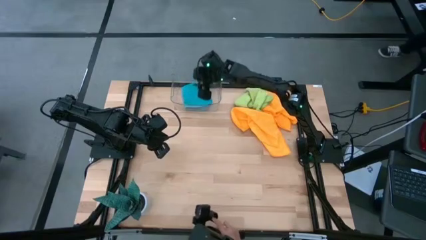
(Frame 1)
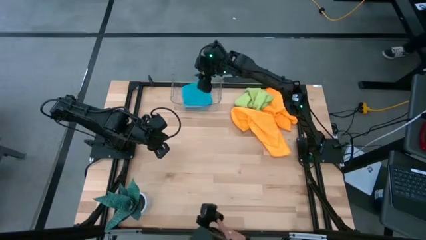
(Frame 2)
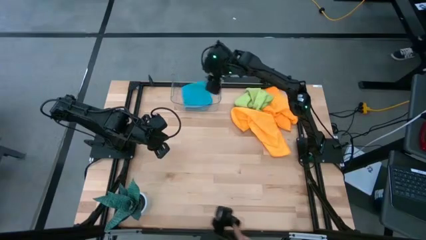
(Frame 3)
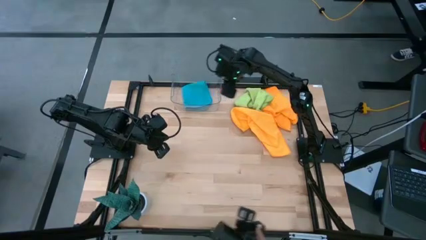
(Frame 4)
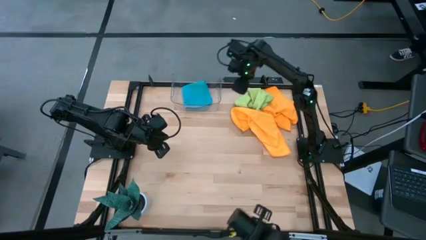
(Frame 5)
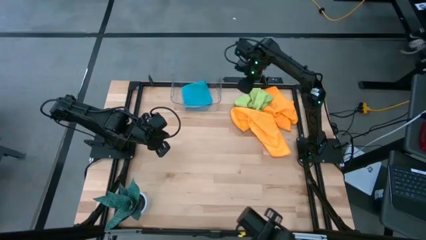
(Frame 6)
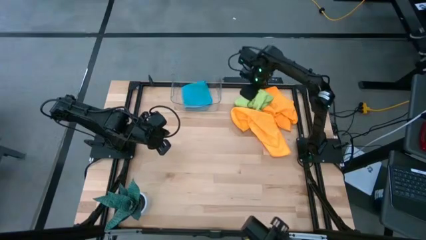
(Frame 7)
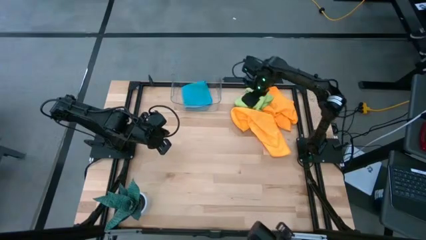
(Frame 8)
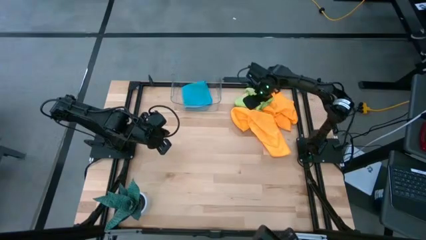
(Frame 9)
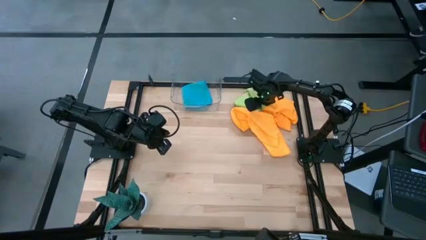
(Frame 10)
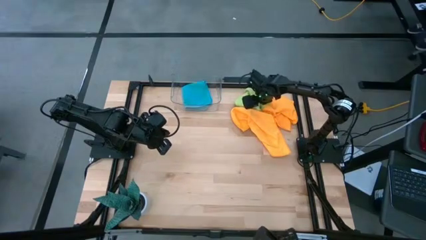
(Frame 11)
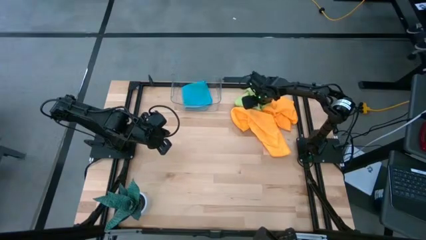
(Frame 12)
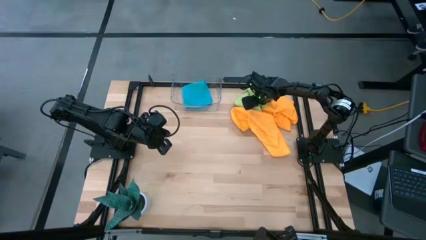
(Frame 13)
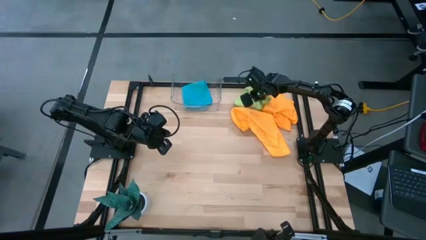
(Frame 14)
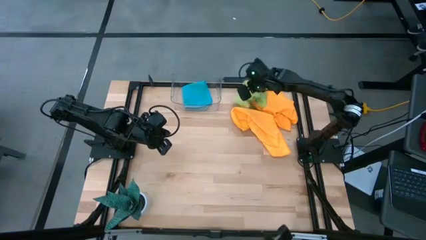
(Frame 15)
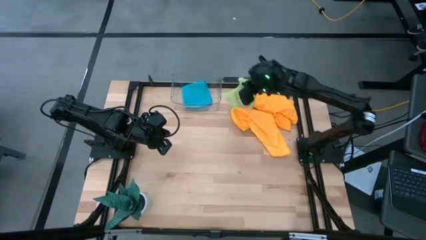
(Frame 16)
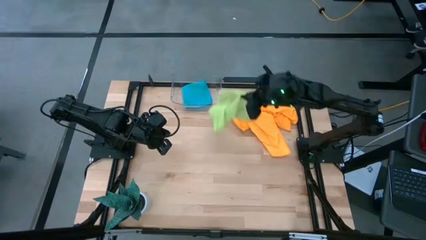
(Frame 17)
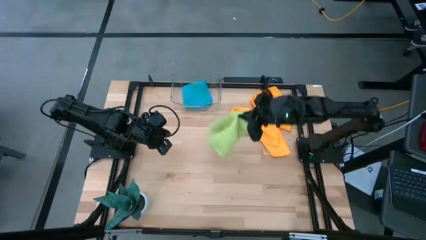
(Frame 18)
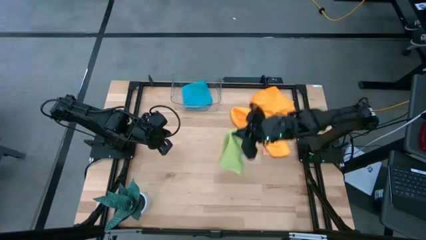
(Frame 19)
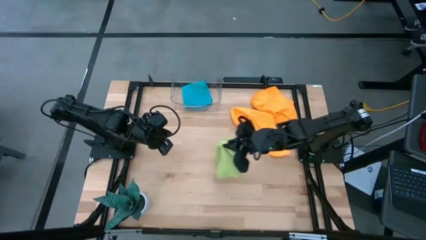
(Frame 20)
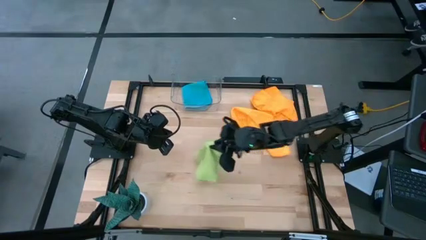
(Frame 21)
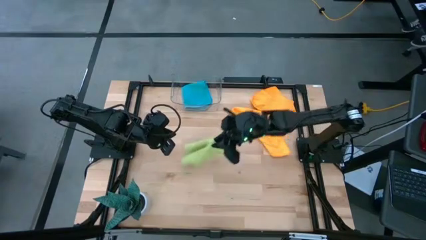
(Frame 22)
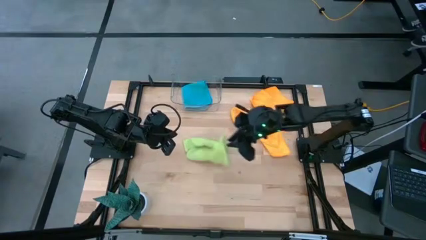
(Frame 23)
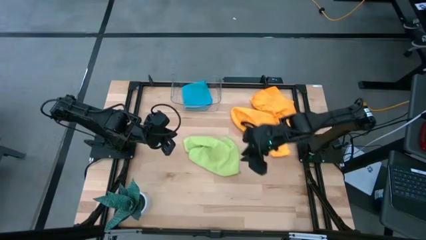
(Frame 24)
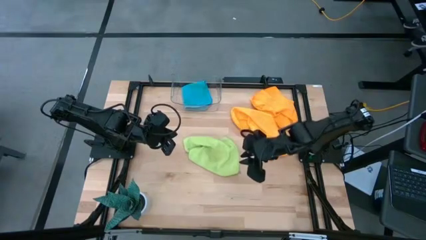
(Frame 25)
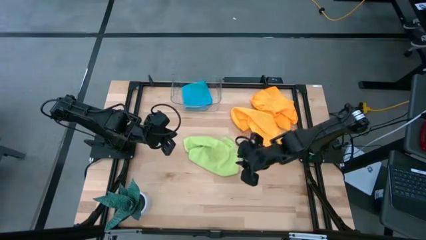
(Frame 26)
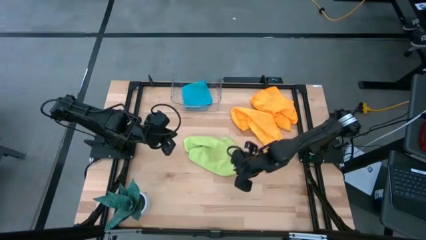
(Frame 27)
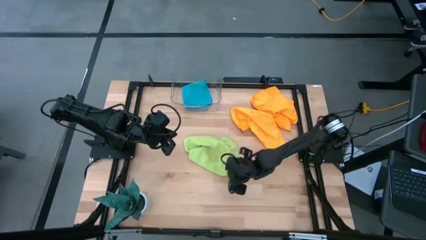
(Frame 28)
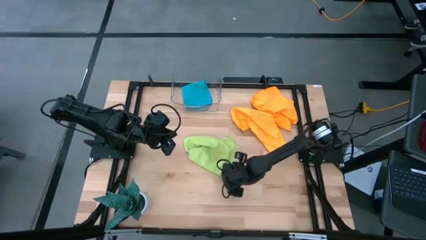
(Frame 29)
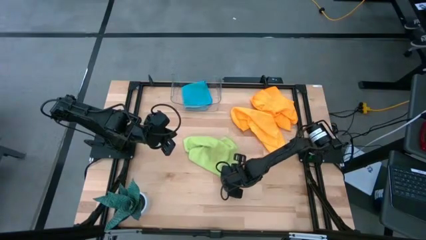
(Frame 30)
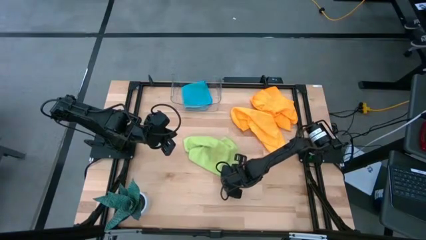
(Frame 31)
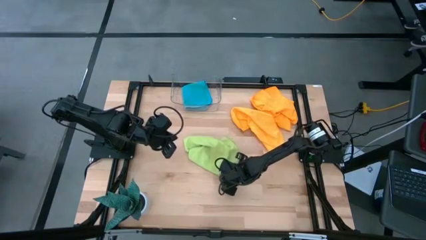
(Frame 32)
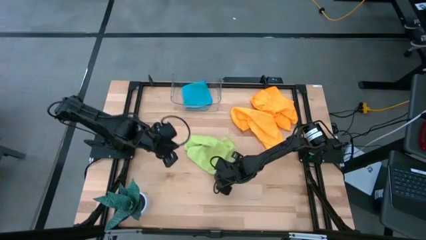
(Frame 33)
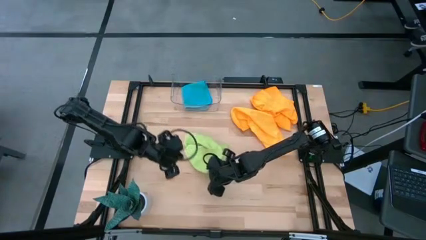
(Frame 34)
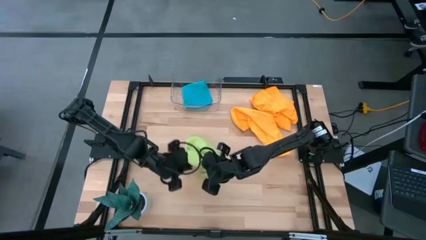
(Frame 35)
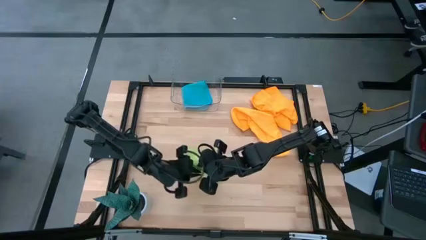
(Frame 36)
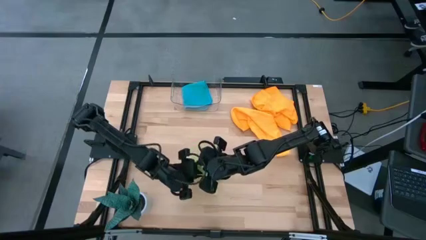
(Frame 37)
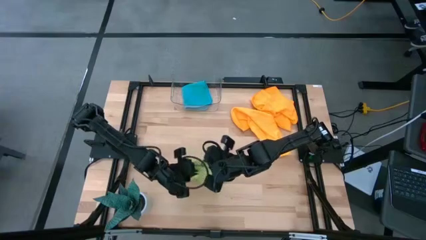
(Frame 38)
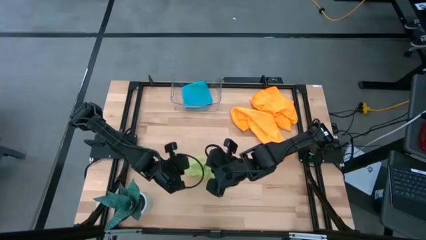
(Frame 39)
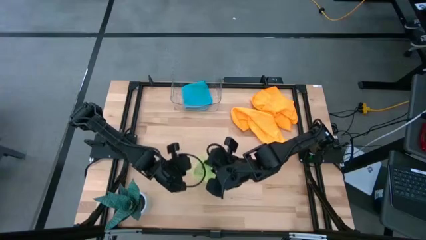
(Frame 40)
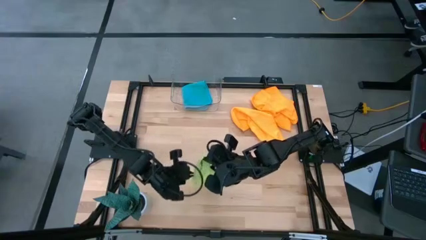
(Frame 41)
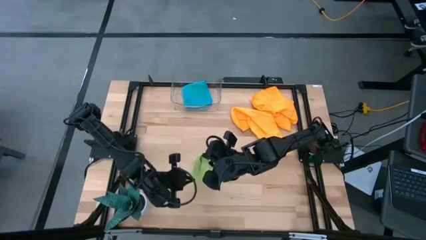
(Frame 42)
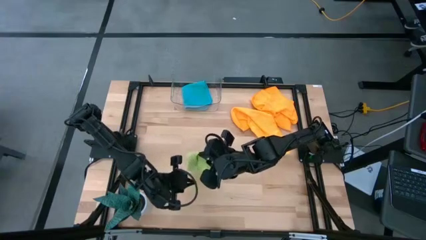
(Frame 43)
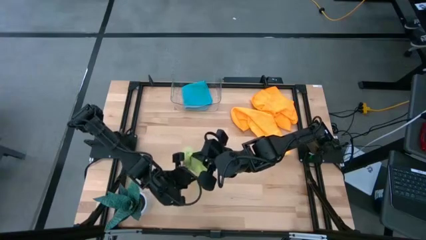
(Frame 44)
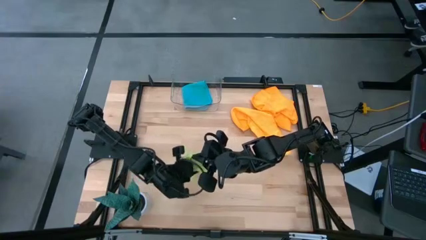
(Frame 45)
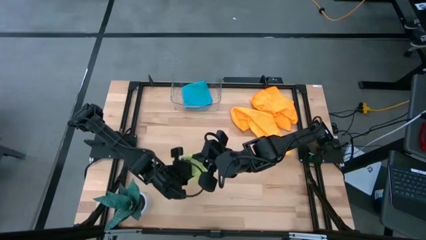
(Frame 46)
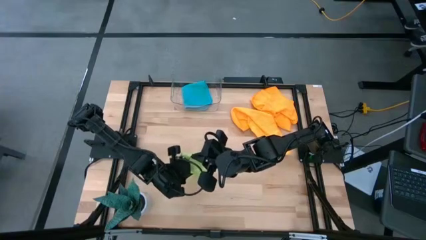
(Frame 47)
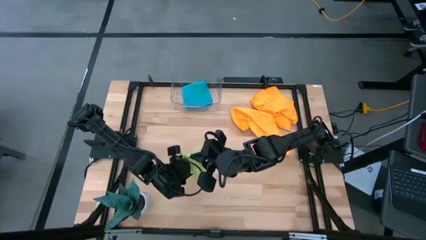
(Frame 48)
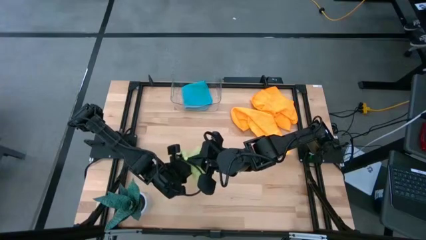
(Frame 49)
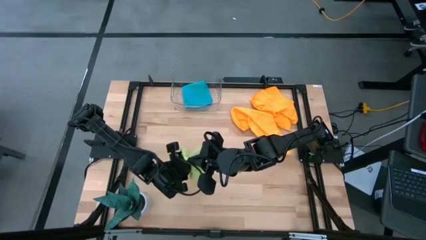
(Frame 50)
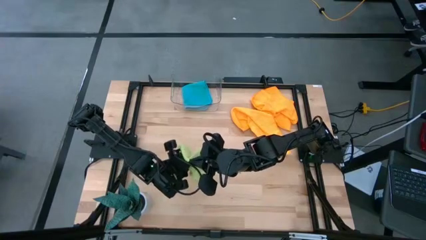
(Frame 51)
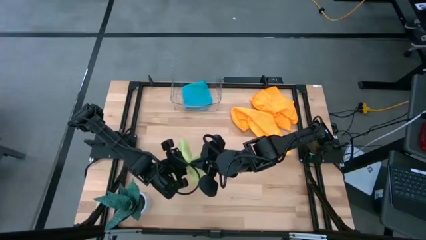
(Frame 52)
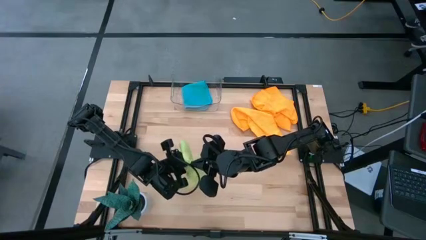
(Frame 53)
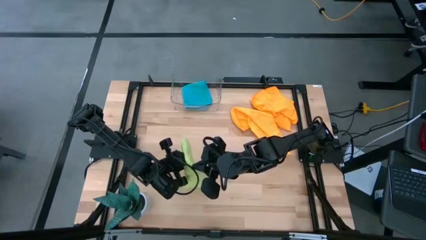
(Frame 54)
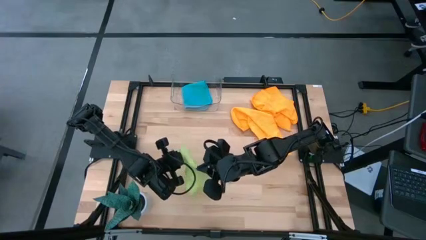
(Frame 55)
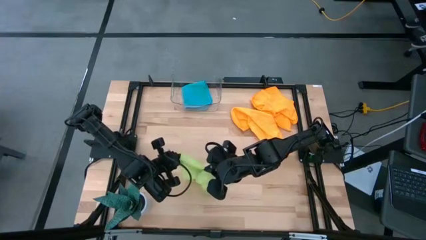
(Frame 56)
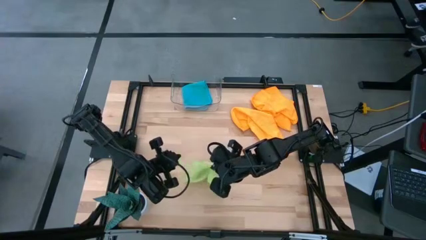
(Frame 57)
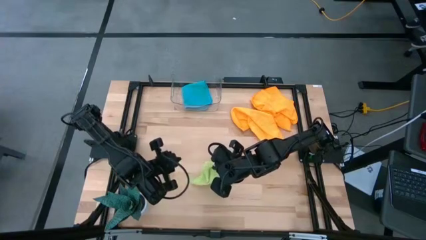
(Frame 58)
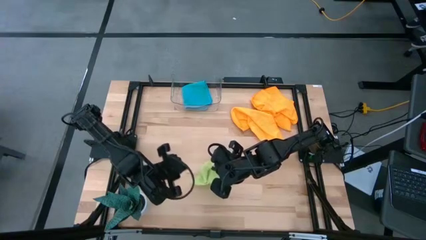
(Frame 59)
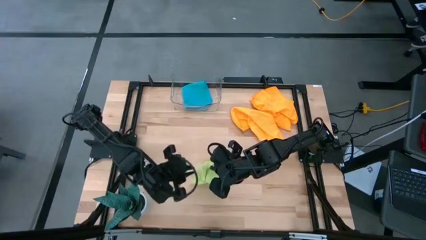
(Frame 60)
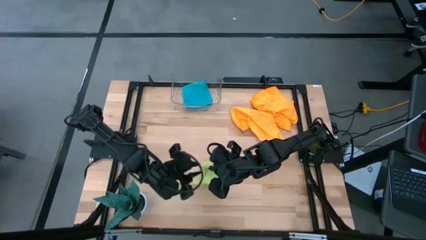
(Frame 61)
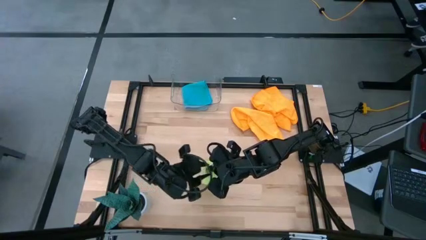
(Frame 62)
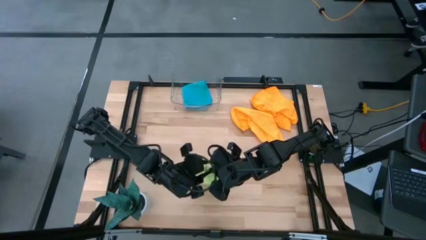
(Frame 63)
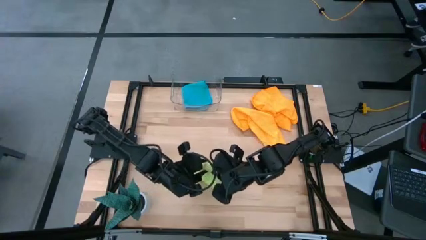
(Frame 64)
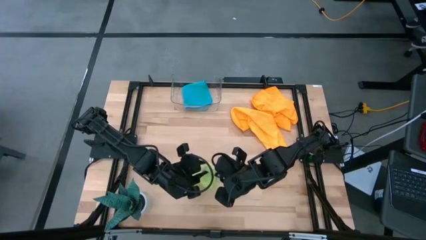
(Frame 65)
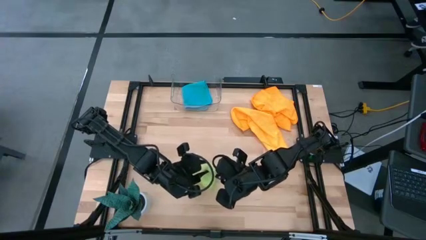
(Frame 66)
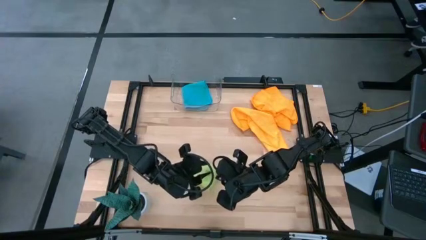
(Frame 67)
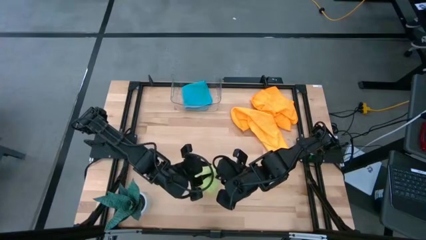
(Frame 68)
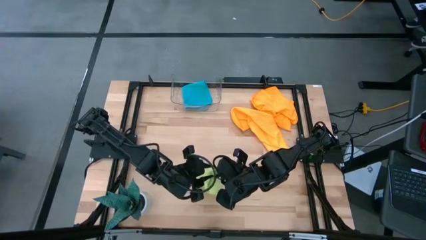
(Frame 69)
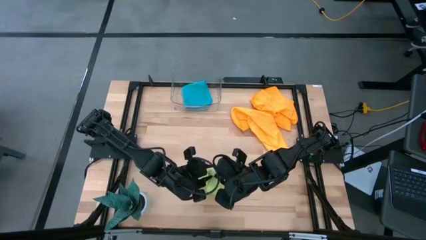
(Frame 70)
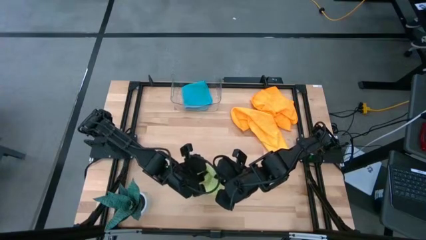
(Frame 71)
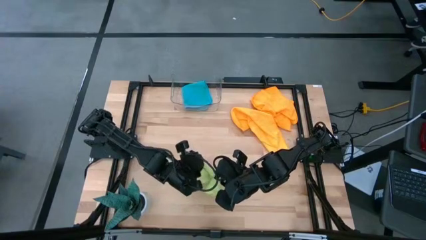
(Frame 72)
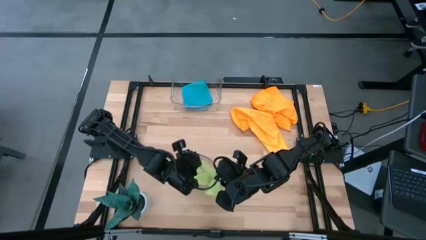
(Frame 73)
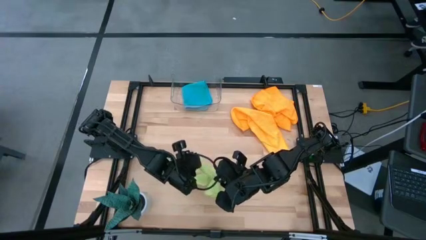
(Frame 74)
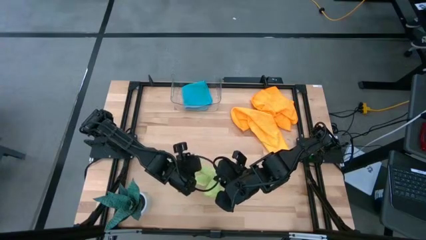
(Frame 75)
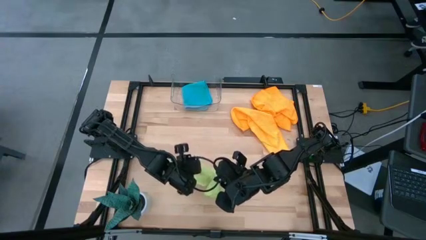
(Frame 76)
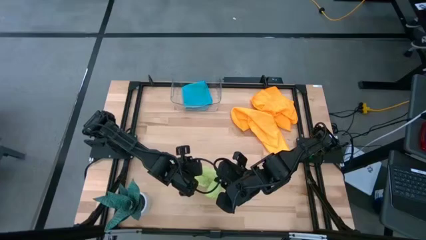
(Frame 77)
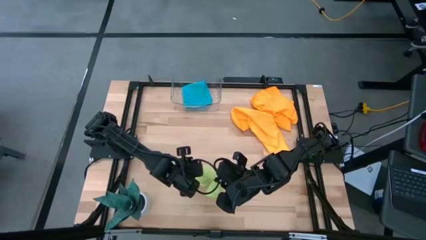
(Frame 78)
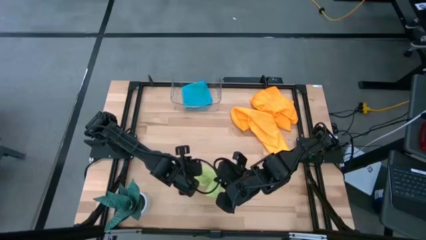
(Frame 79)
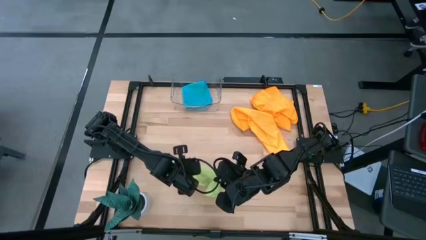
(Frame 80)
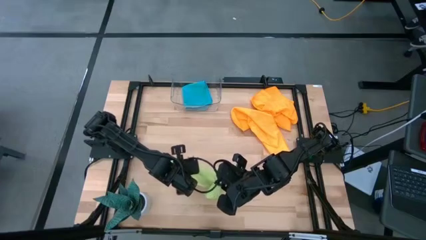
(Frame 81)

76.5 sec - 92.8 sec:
Task: Fold microfiber towels
Fold the green microfiber cloth

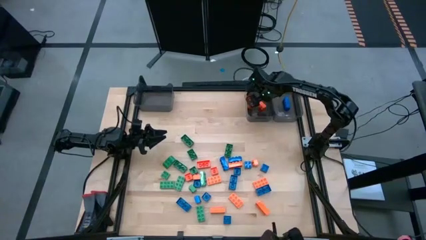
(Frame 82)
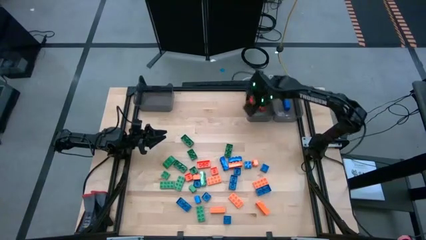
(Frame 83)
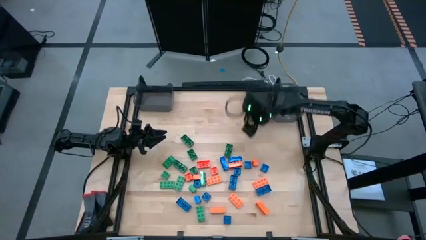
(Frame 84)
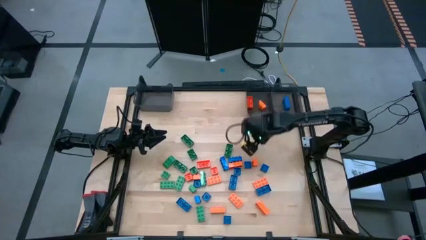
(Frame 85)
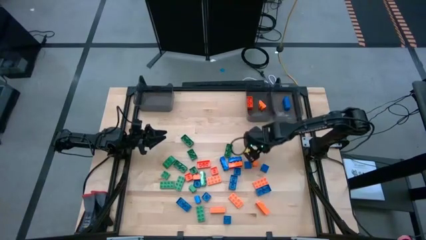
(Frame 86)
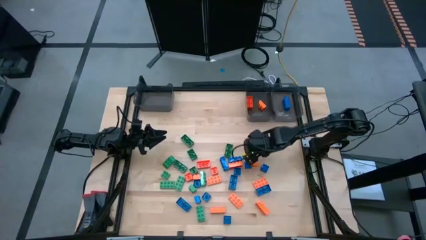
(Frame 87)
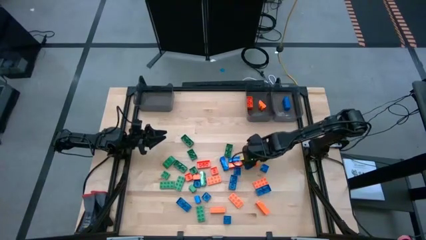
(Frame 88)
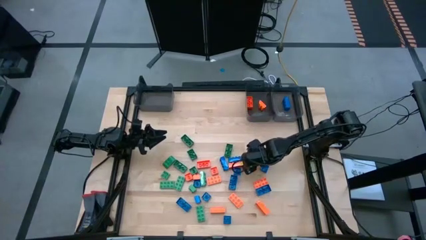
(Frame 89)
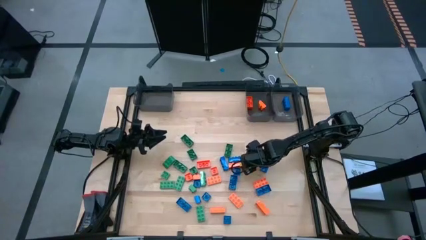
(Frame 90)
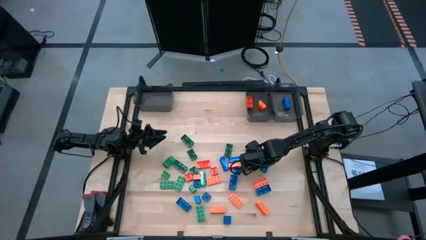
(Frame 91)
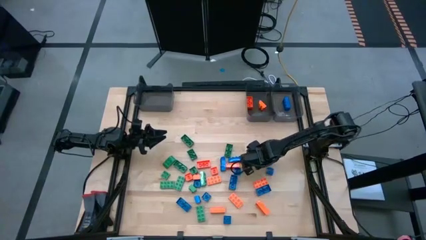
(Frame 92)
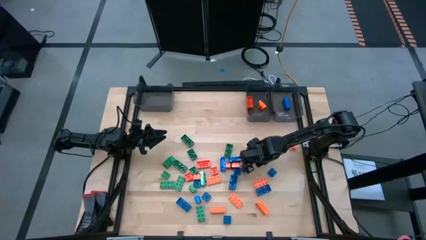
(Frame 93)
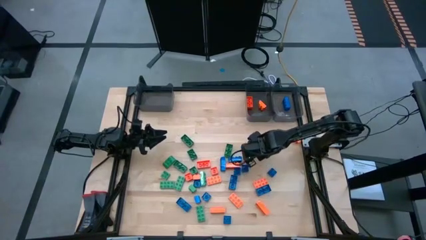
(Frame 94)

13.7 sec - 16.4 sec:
Task: Sort blocks
Put the orange game piece into the middle black bin
